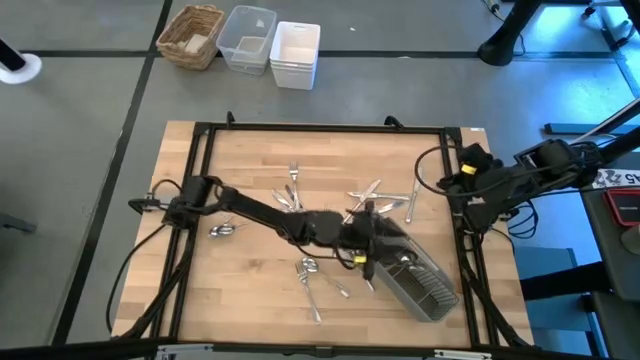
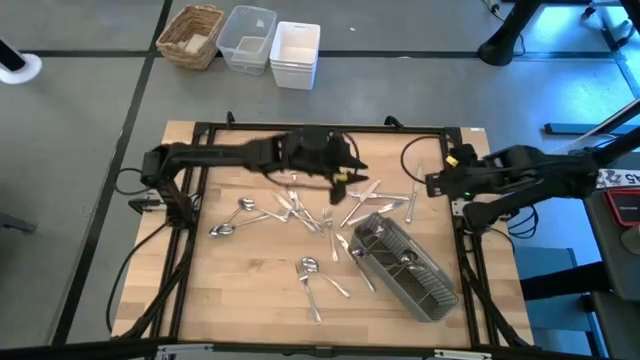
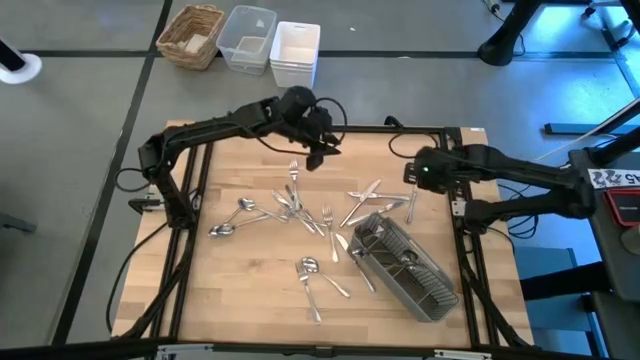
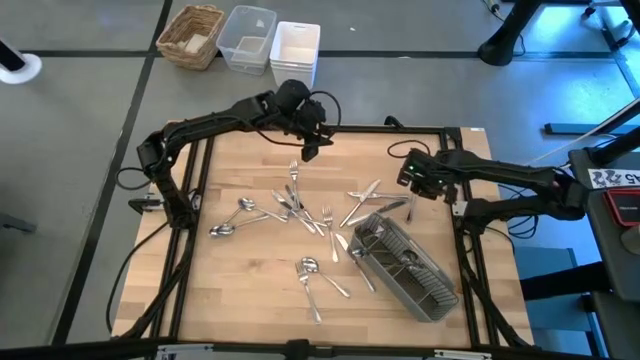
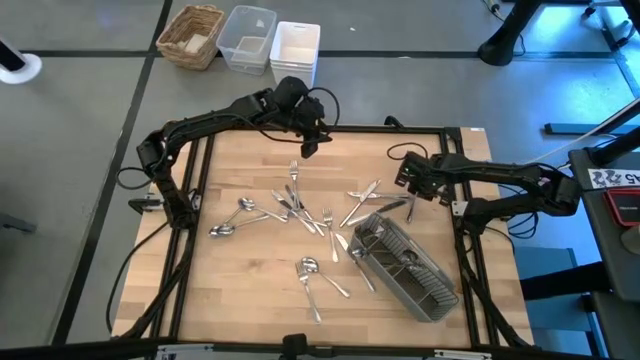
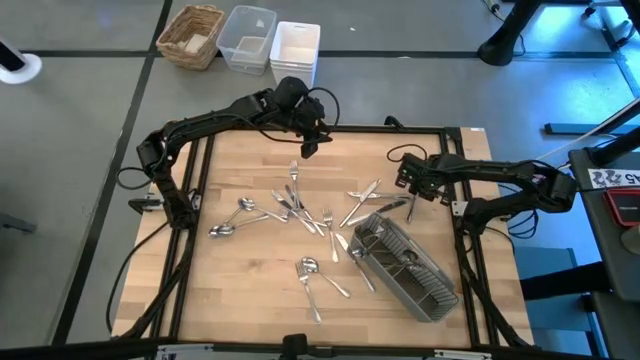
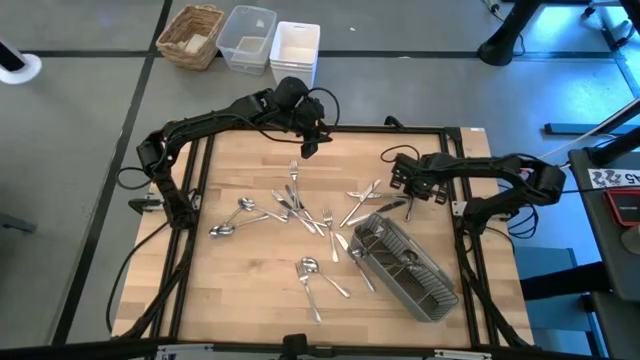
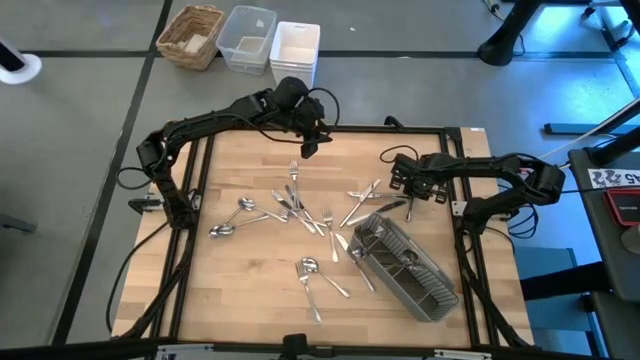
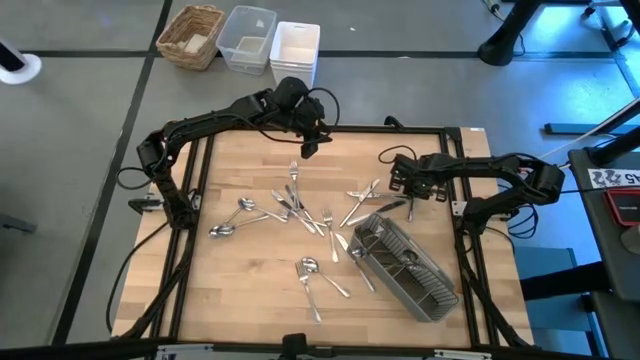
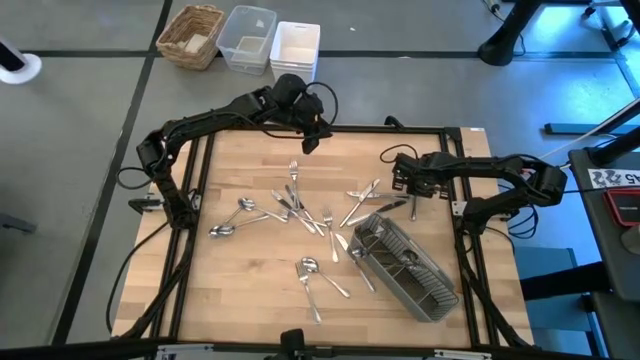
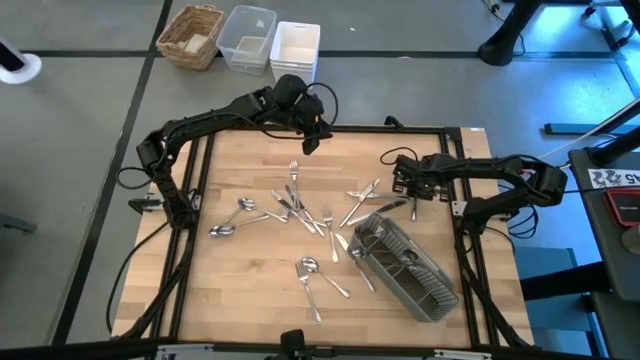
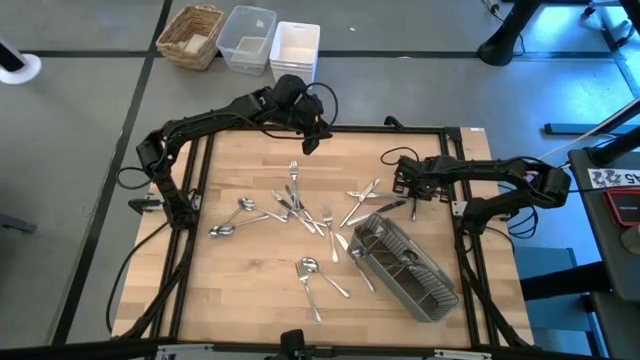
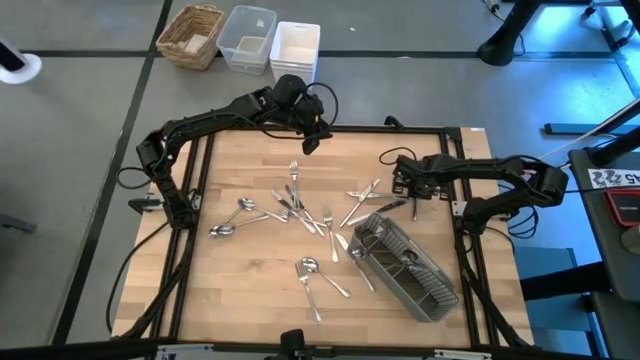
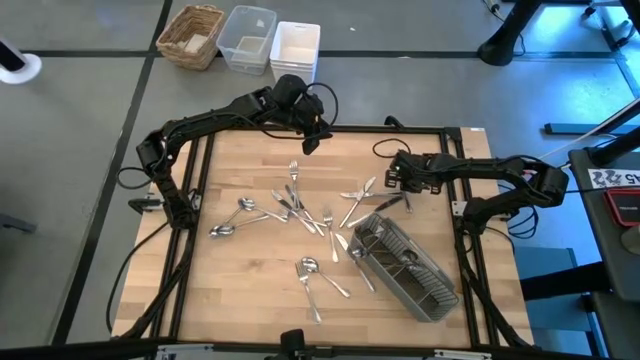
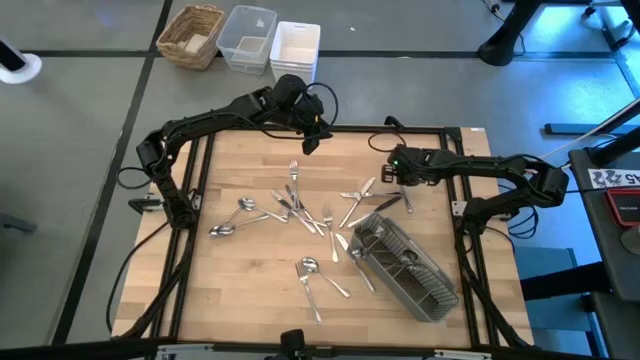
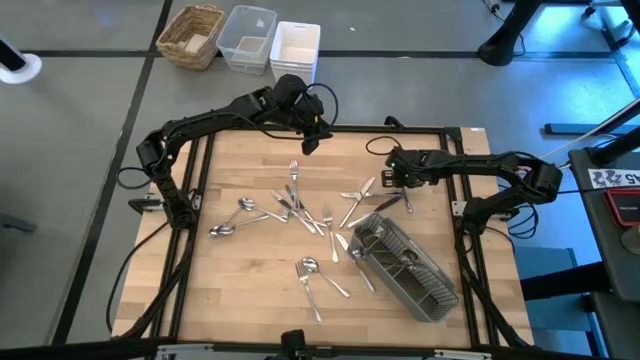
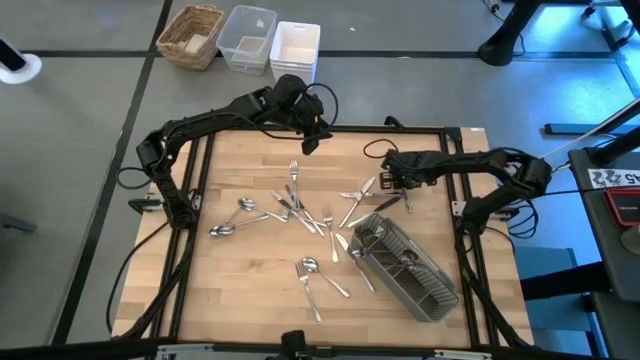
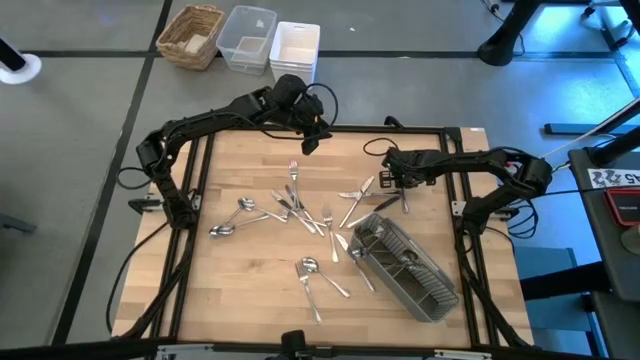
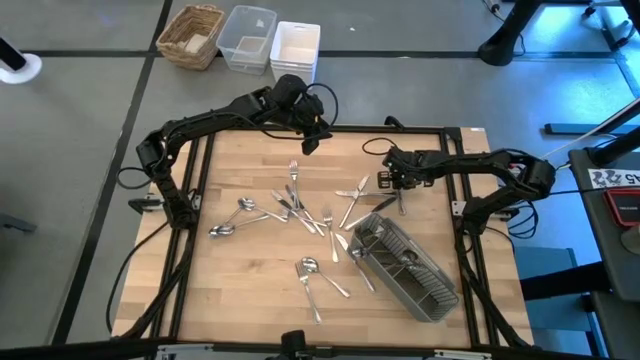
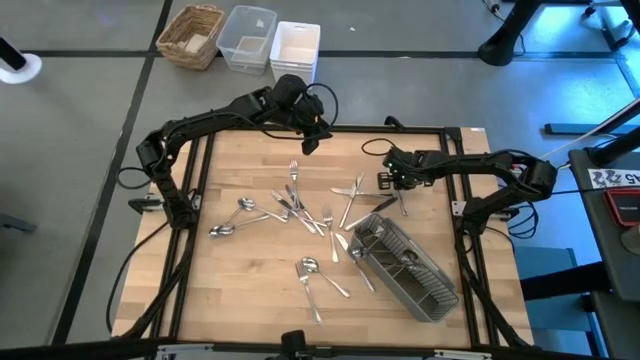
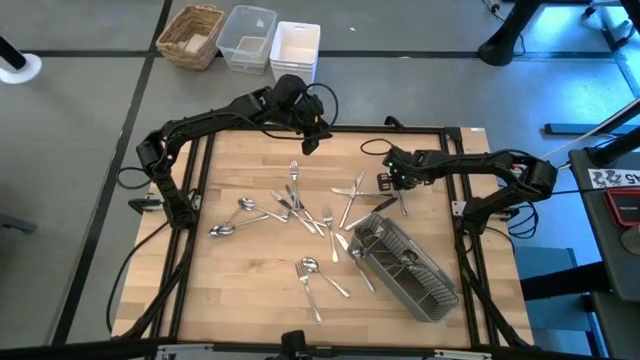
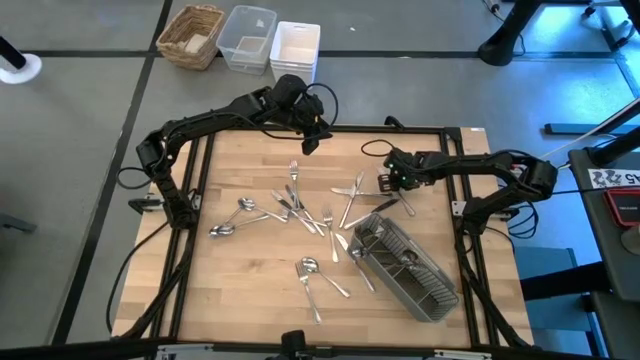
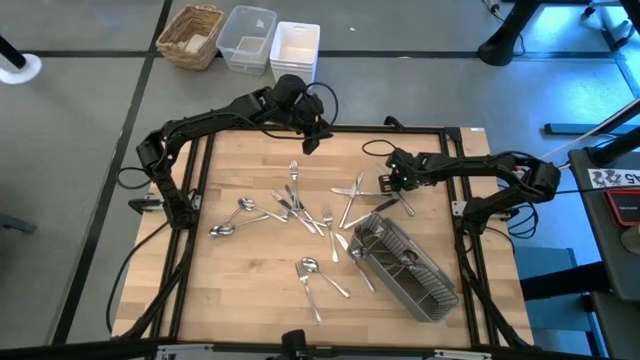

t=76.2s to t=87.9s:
Task: Sort silverware
Put the silver table knife into the gray silverware basket

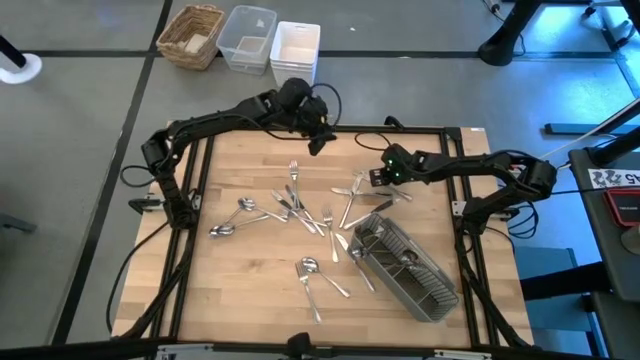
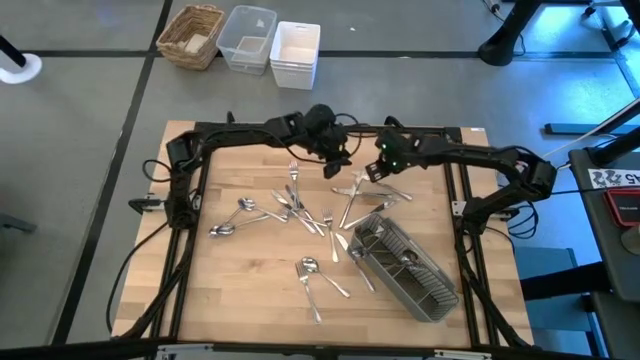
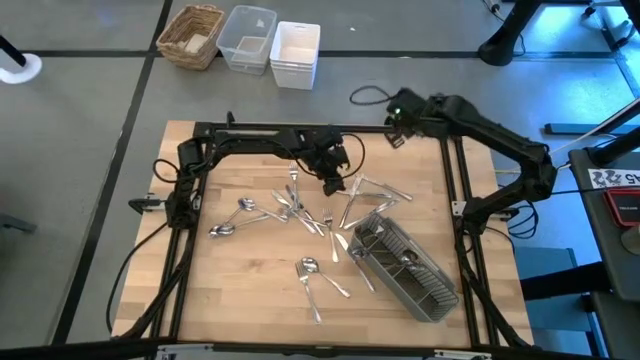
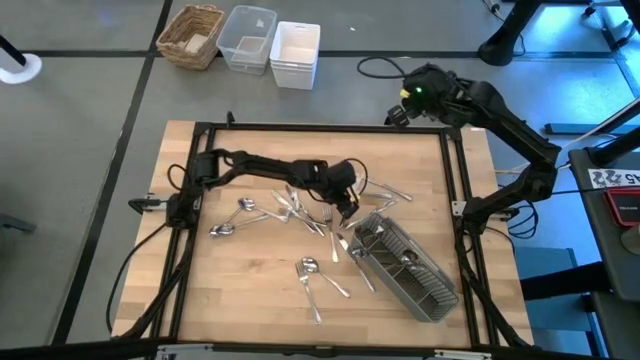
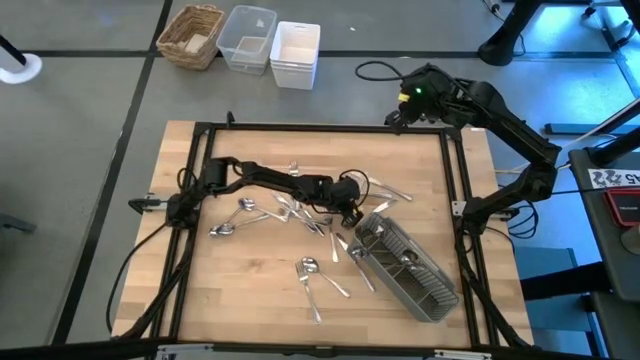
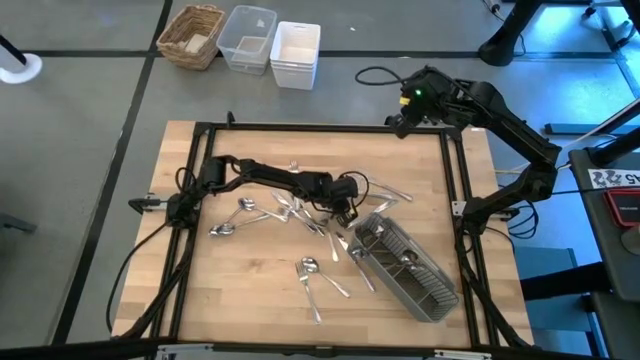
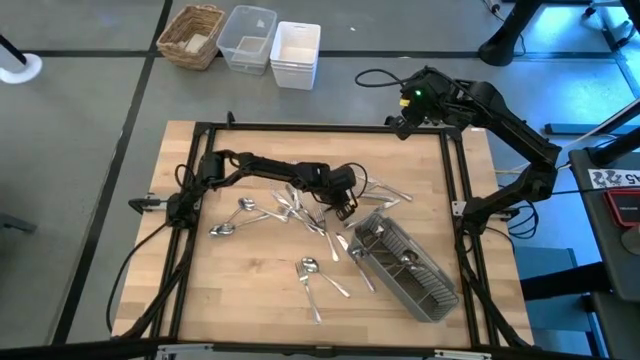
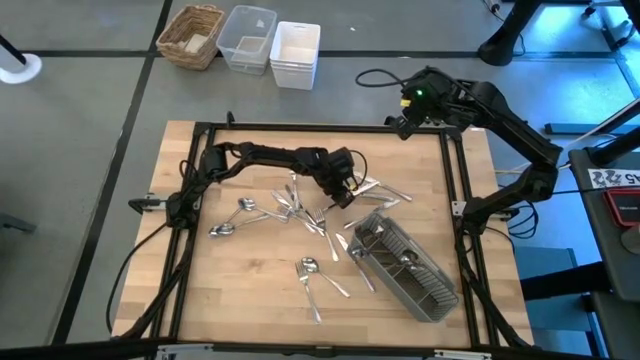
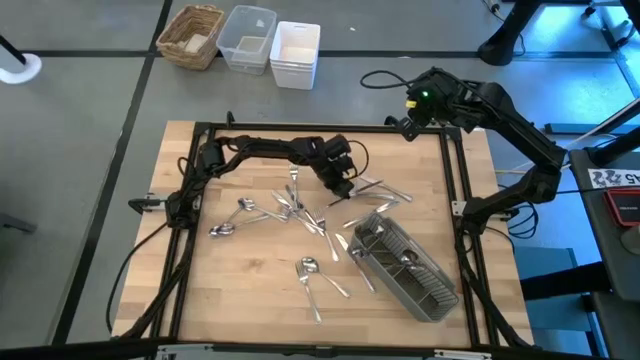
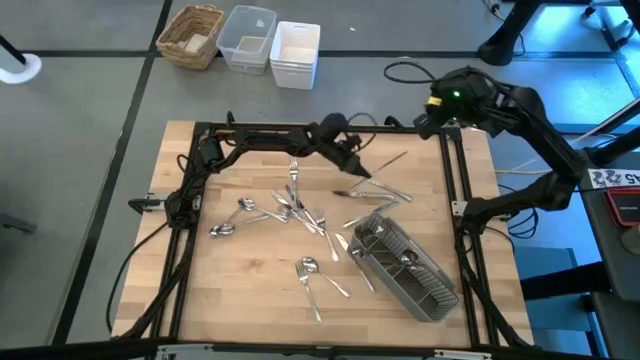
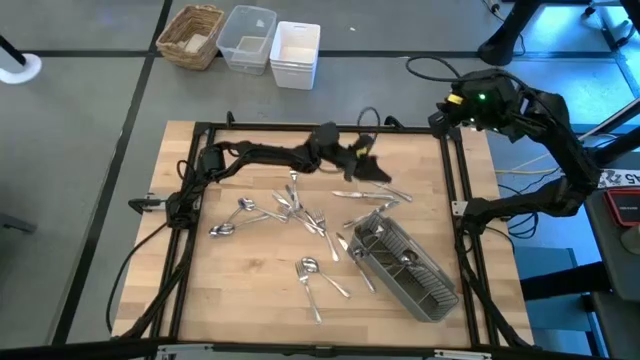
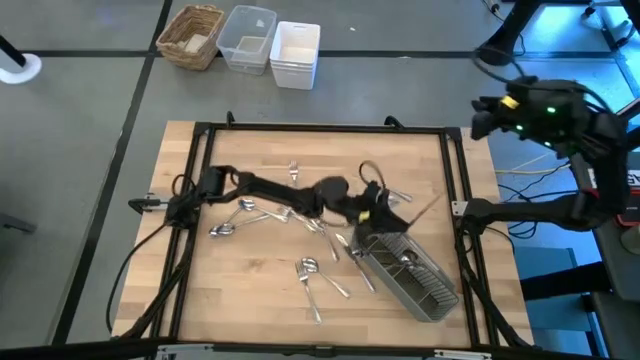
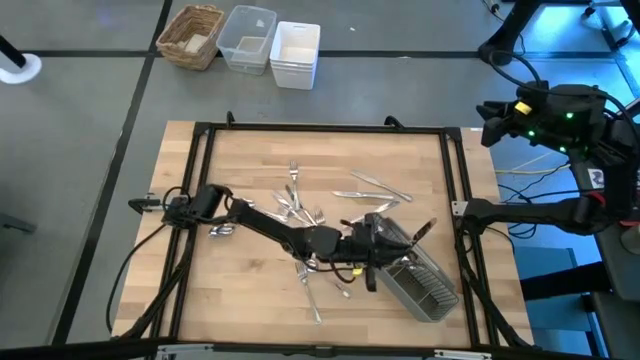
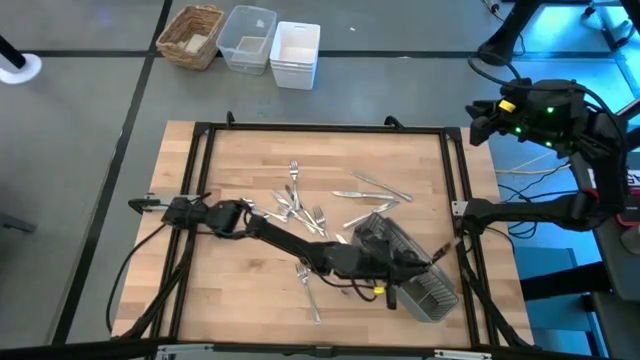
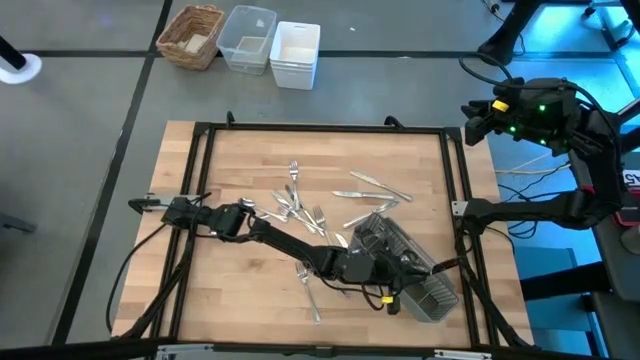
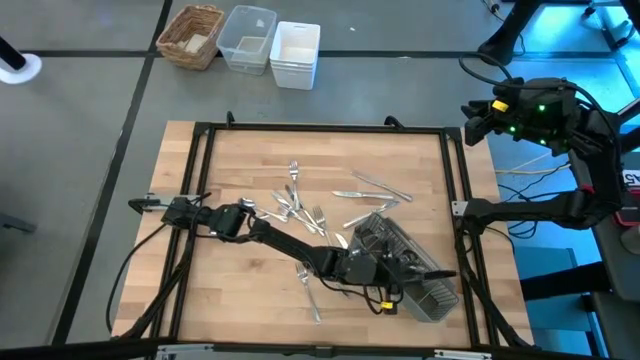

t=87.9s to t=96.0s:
Put the silver table knife into the gray silverware basket
